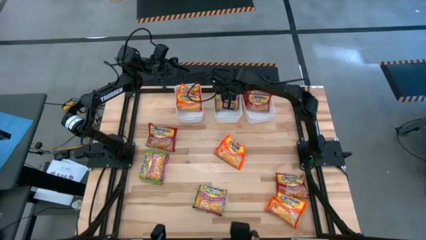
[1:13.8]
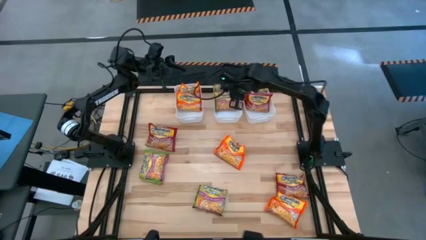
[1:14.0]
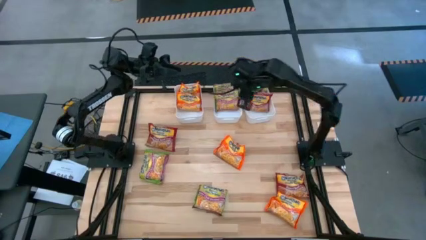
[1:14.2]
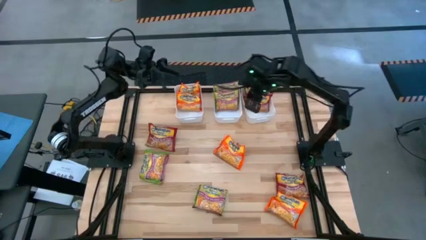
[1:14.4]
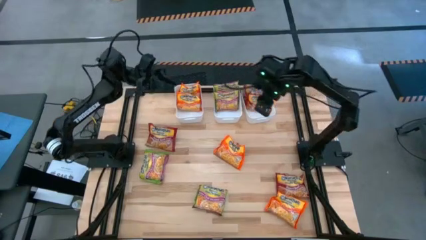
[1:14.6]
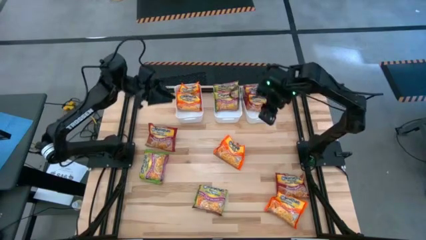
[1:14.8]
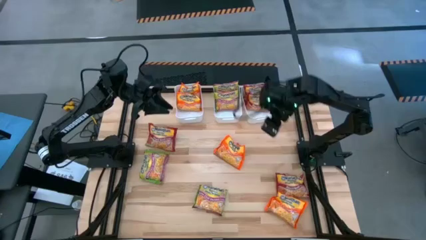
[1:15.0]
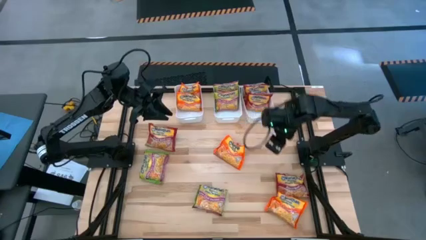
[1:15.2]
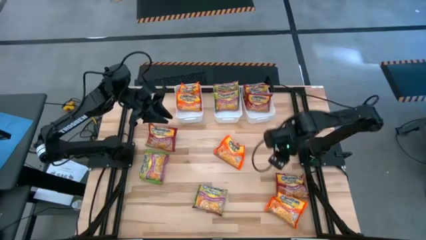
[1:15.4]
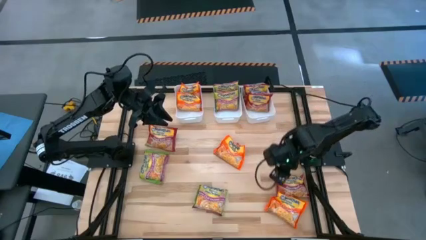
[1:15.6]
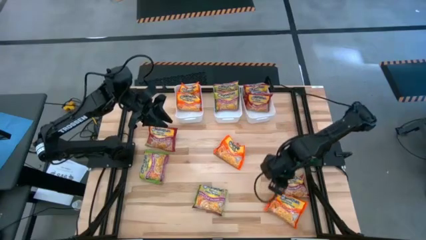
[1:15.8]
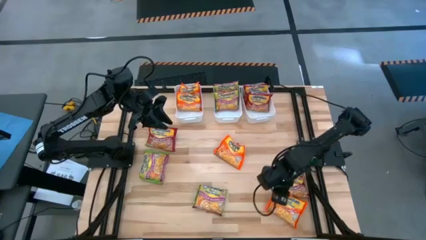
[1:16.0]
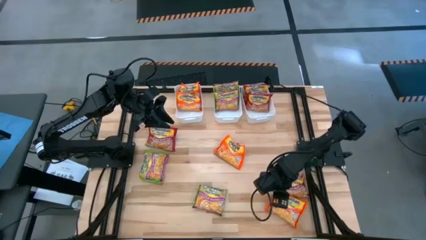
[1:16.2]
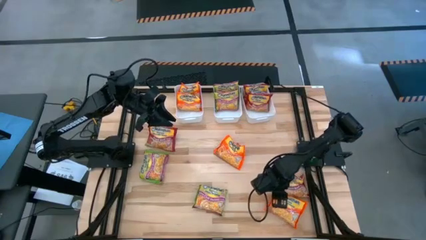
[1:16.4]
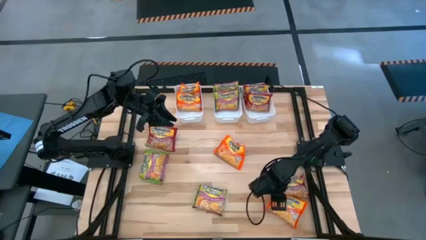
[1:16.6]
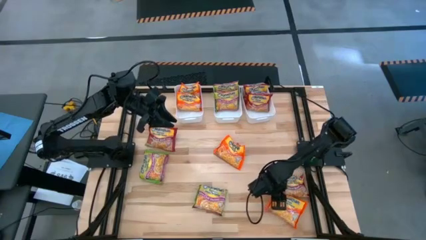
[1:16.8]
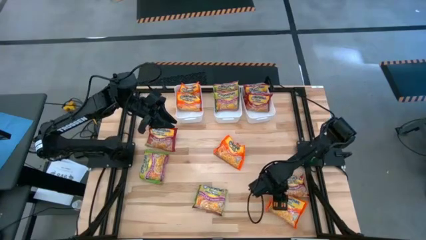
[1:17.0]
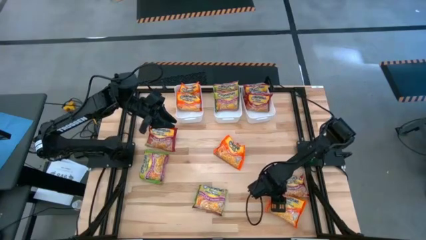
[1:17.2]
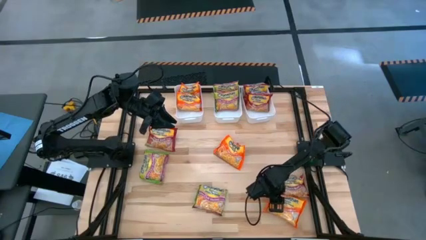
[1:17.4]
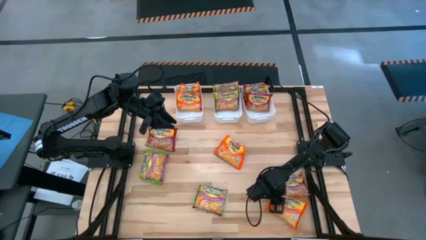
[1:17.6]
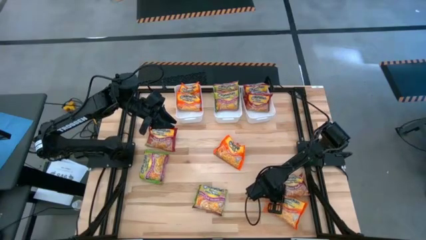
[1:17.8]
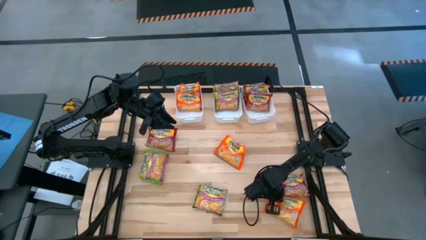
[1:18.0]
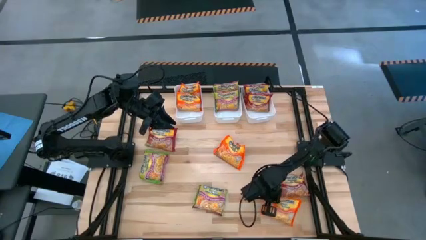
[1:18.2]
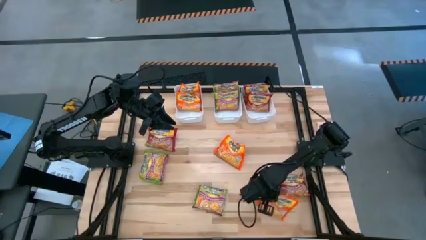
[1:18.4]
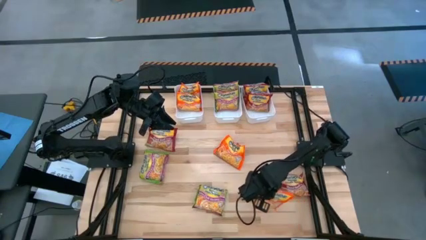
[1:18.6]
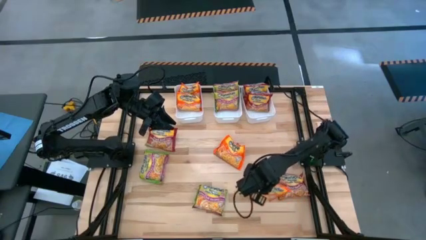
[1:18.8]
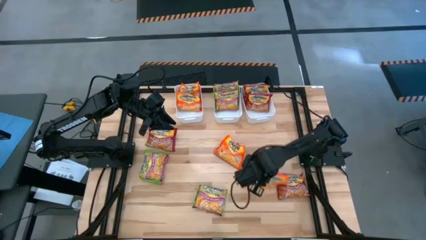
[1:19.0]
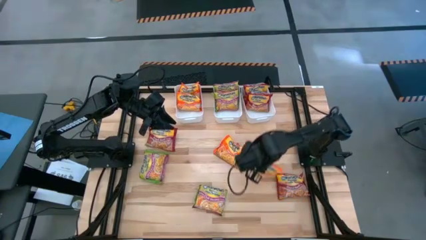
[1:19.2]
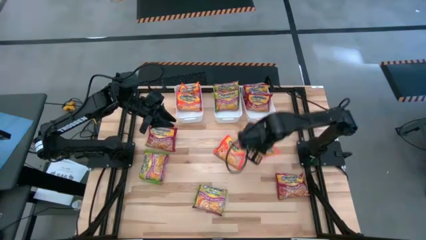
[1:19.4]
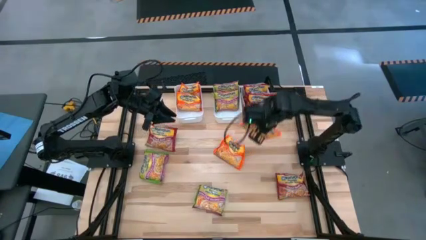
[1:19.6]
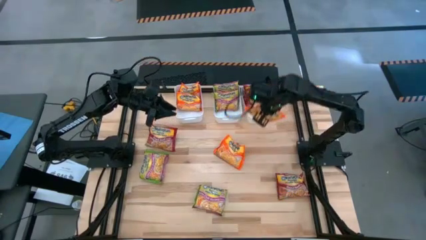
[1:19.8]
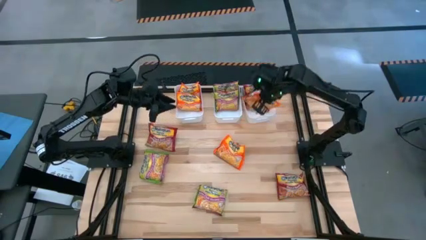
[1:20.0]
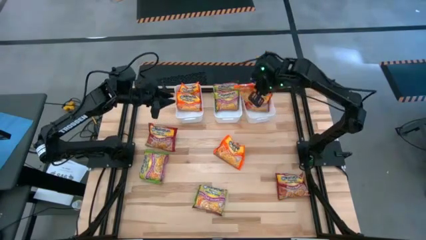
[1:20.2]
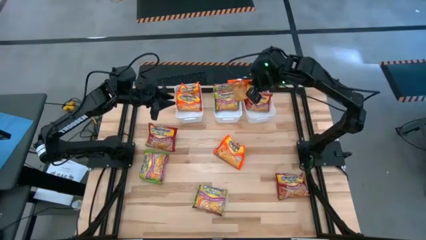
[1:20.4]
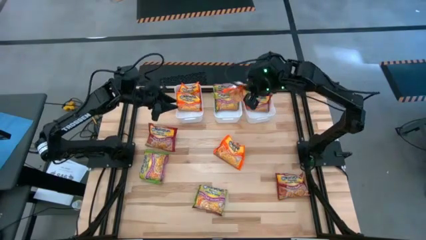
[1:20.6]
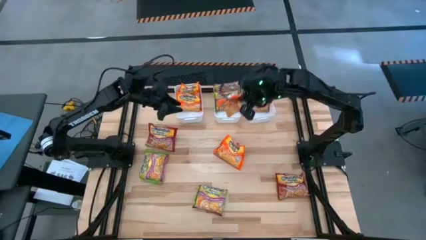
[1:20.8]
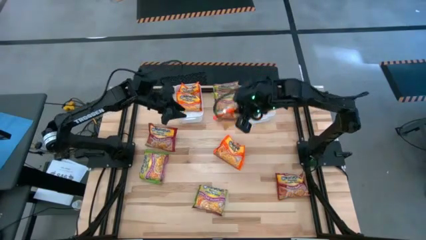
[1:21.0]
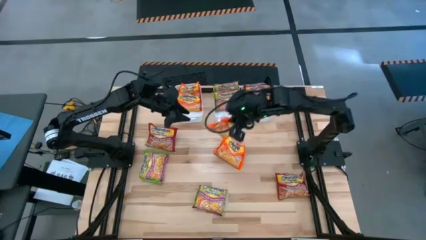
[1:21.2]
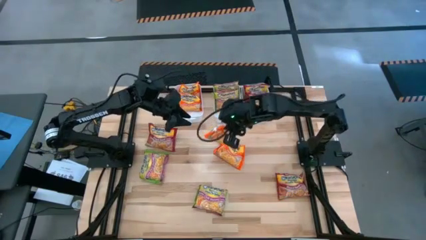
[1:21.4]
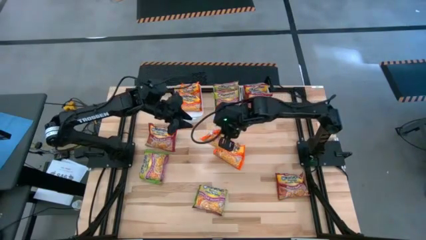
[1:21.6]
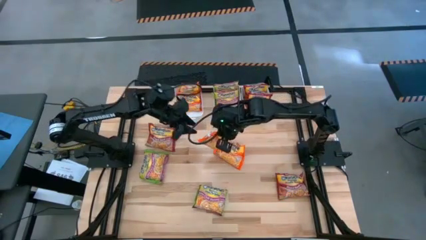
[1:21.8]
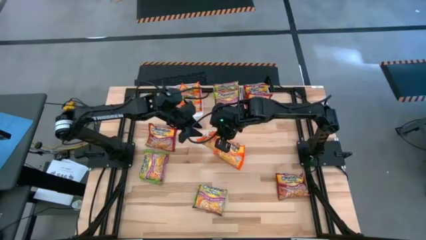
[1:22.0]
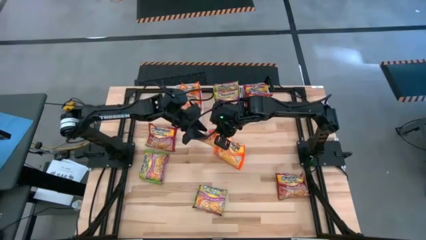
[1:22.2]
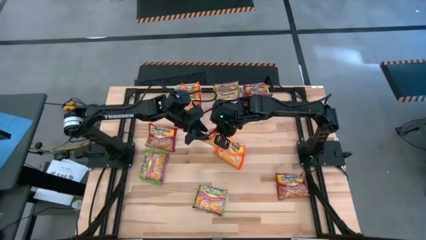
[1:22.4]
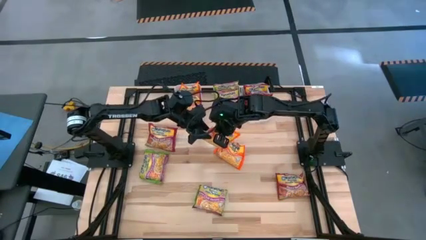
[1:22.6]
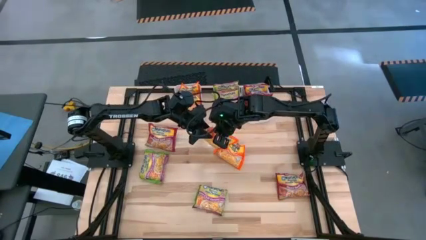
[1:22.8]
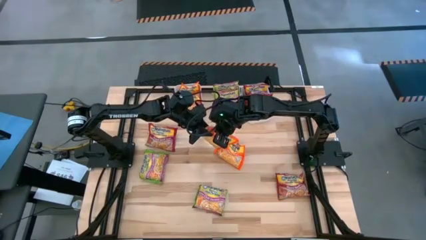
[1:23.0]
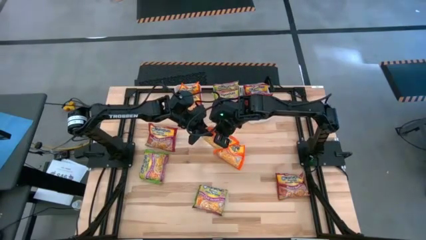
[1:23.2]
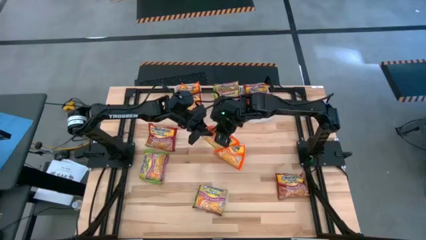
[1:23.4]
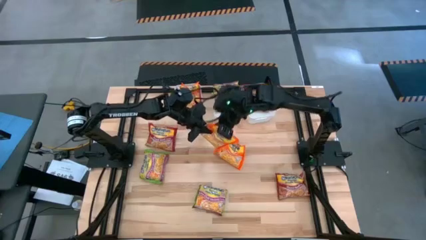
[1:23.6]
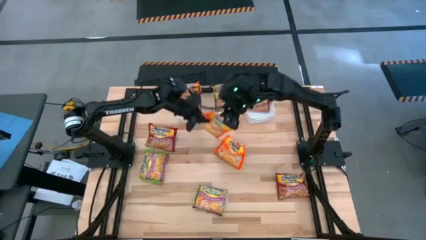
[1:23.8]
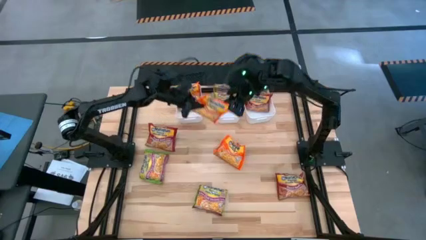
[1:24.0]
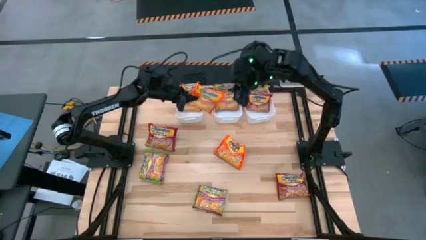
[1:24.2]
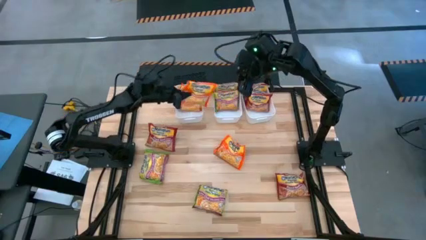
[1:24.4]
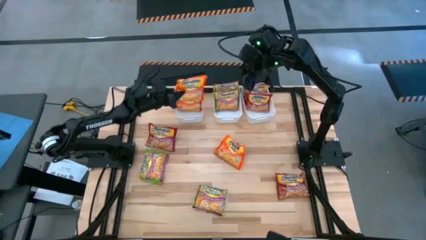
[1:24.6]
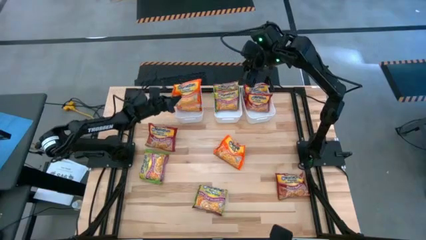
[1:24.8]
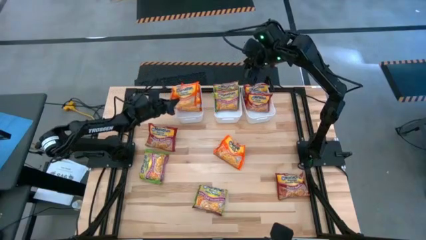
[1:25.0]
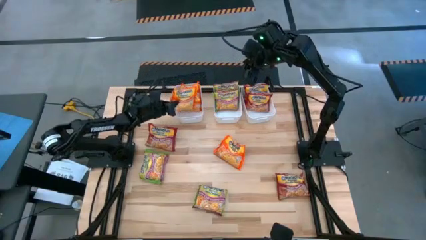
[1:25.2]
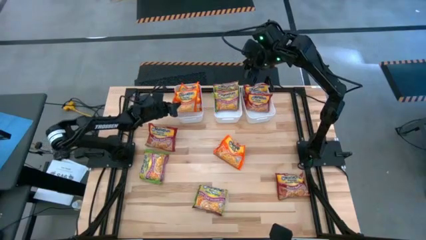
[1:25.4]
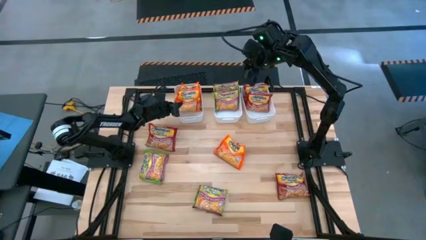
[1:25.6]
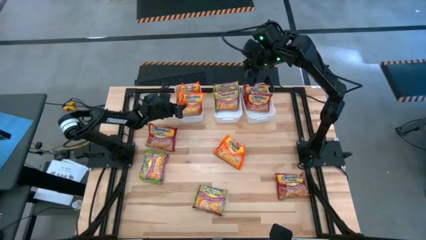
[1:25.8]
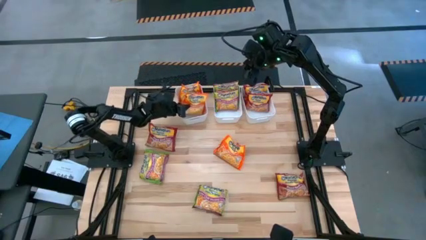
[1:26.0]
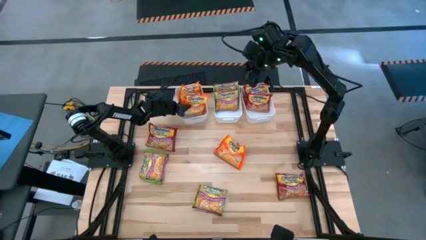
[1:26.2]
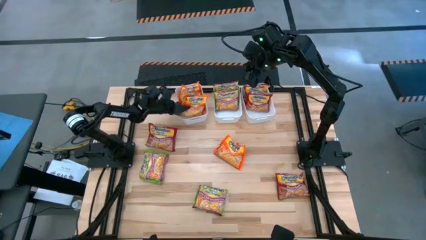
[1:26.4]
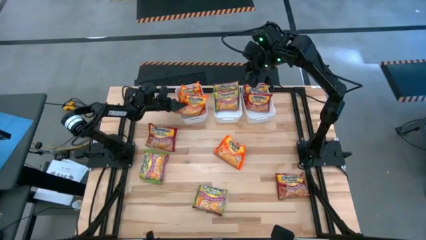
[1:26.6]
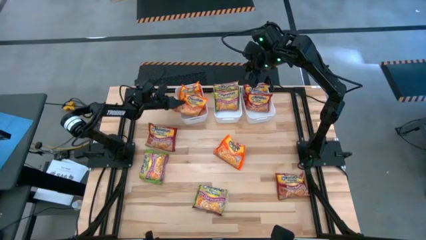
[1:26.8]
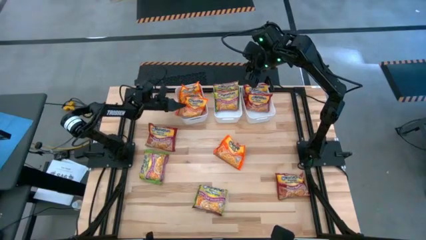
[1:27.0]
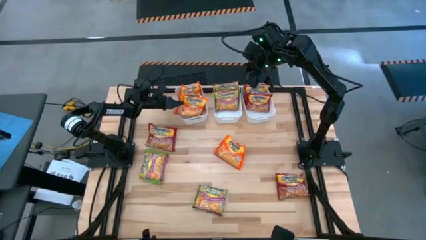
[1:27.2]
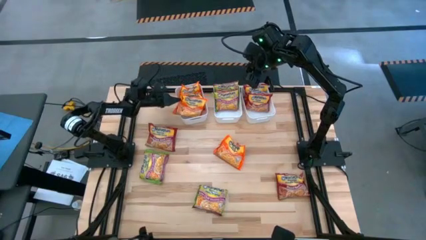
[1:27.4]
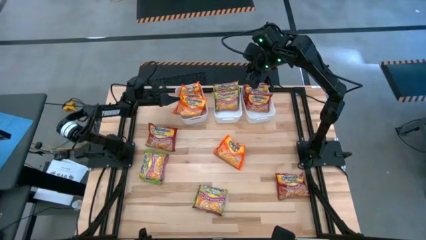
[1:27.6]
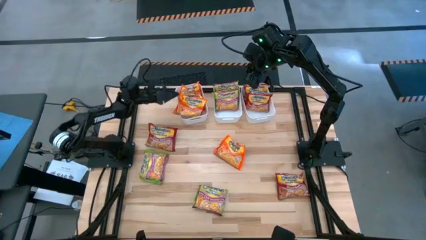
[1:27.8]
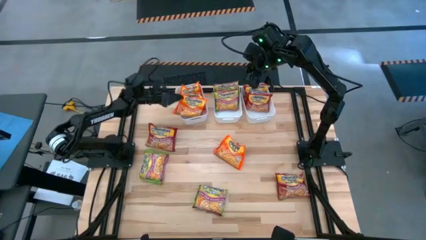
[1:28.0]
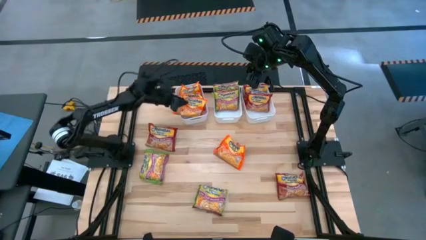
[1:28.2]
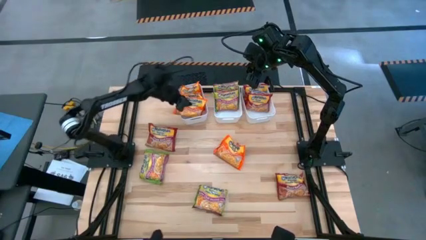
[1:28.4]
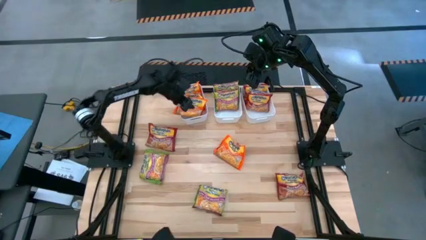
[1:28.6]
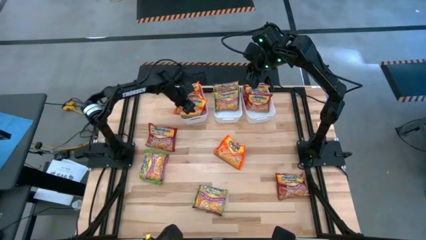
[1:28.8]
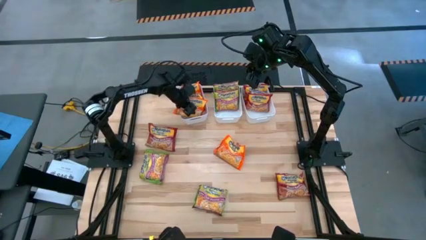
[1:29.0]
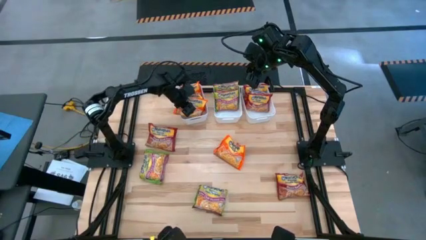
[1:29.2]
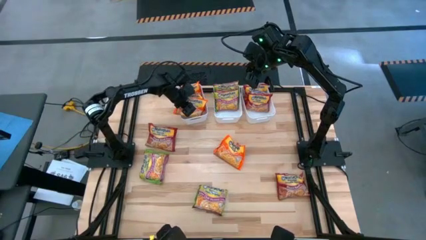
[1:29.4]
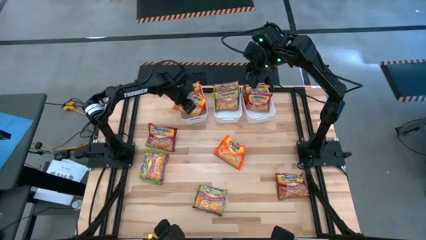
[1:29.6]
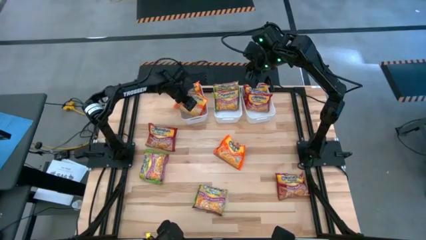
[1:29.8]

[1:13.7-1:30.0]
Task: Sort Maruchan noodles
Put the orange noodle pack into the left white bin

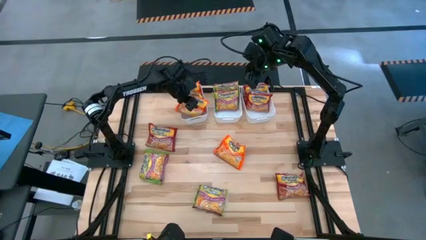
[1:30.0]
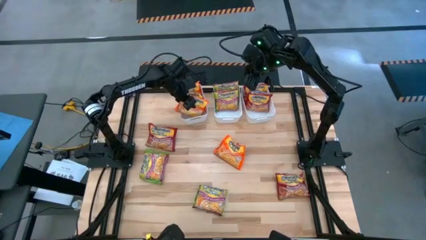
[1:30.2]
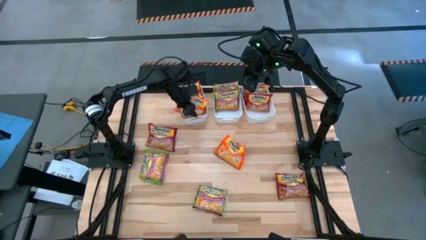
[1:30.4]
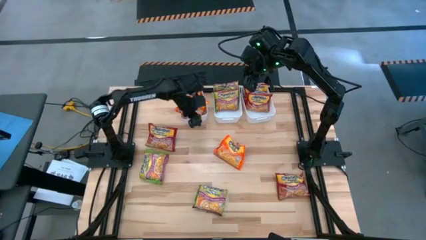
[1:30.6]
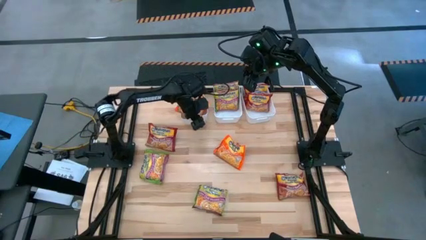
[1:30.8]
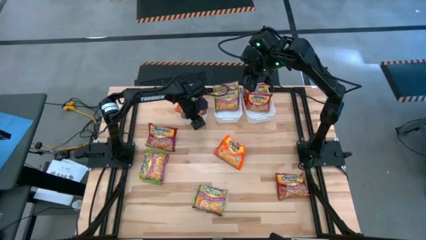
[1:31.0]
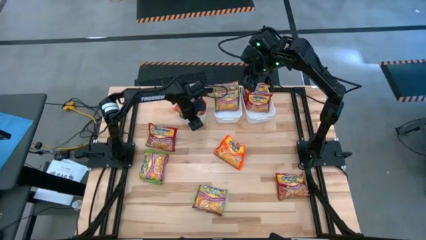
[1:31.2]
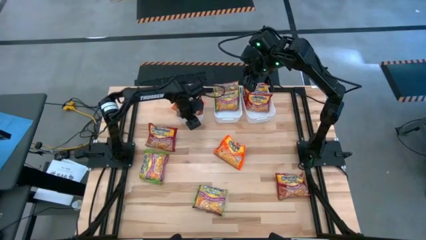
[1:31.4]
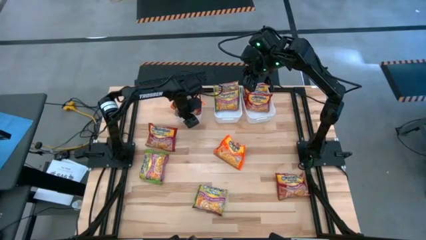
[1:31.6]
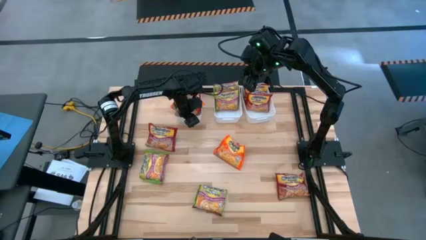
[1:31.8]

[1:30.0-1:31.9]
Adjust the left white bin
